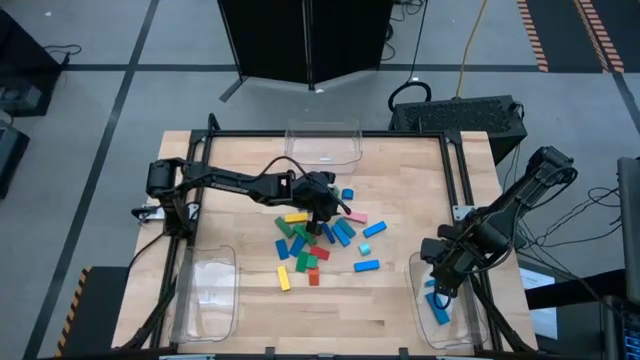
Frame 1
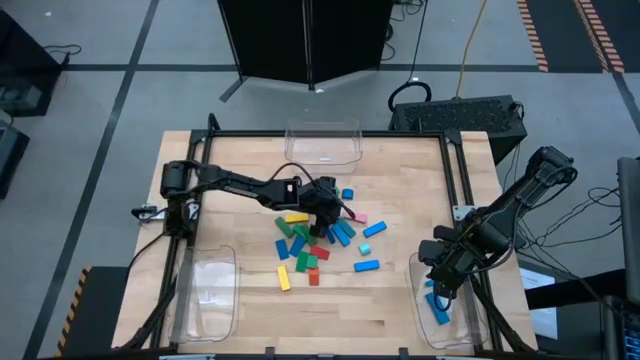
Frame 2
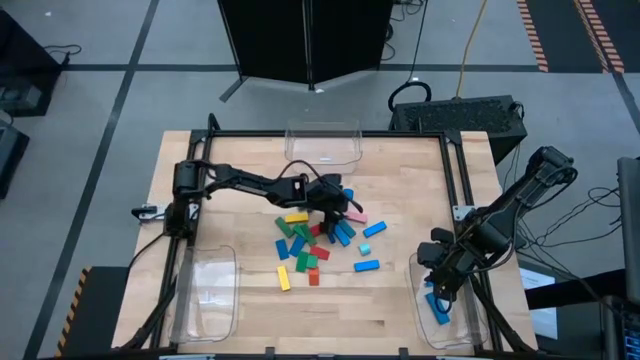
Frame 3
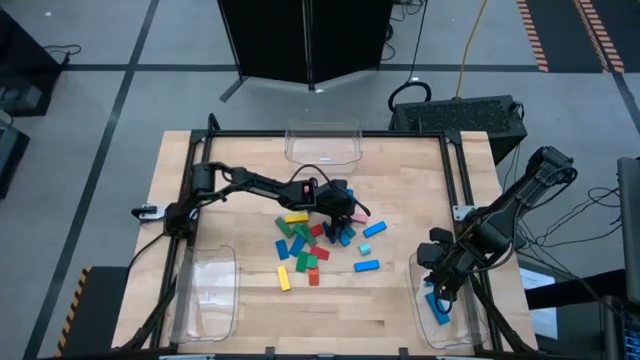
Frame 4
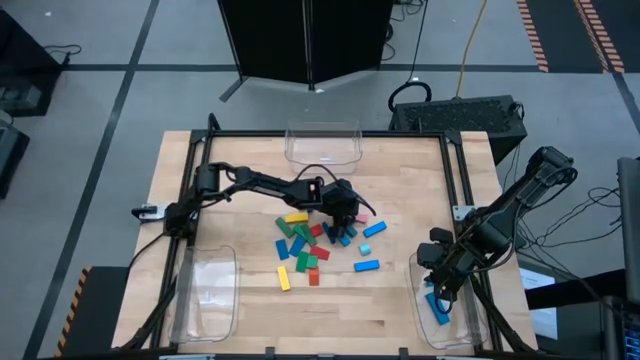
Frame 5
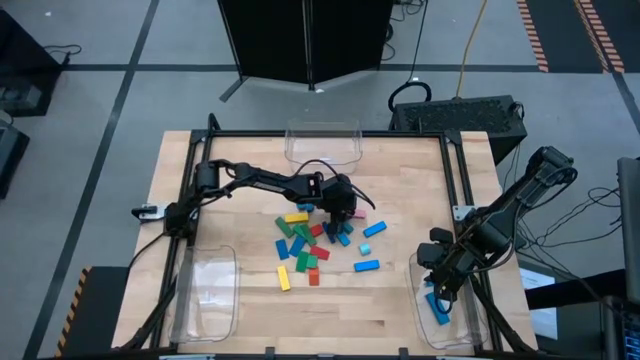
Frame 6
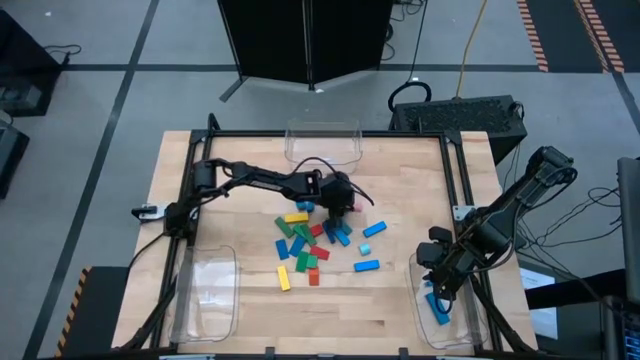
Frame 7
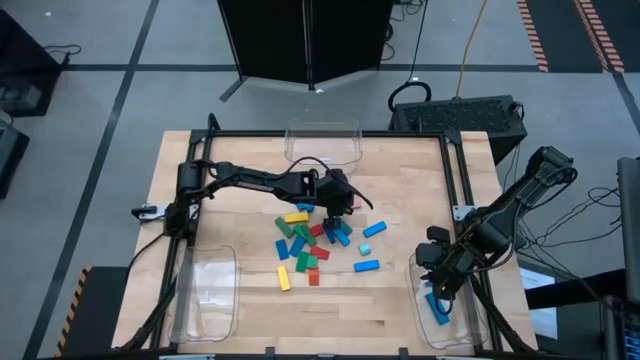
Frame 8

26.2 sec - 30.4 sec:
Task: Sort blocks by size
Put the pink rectangle block into the bottom right transparent bin

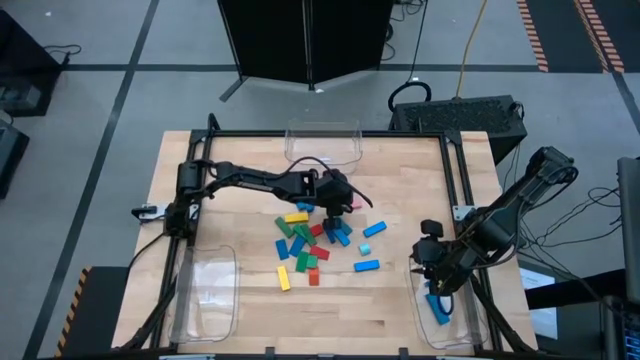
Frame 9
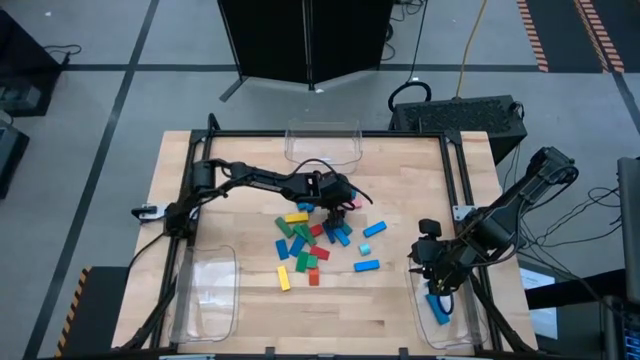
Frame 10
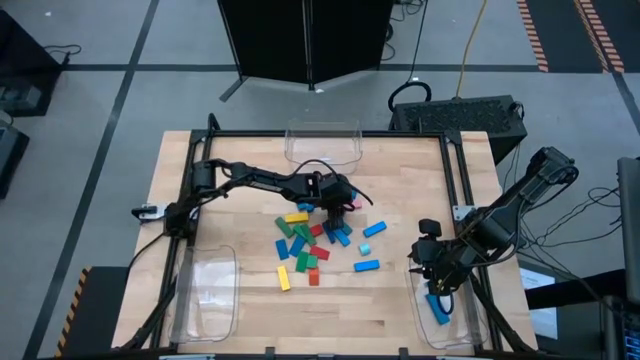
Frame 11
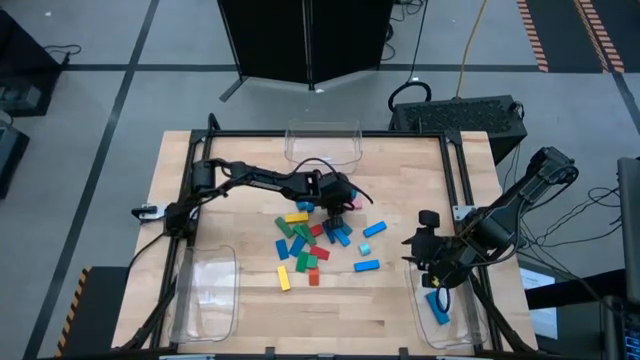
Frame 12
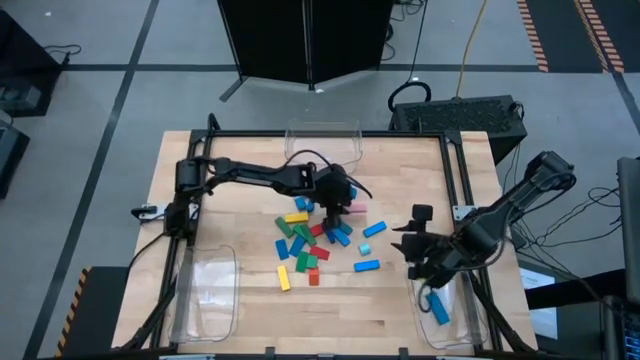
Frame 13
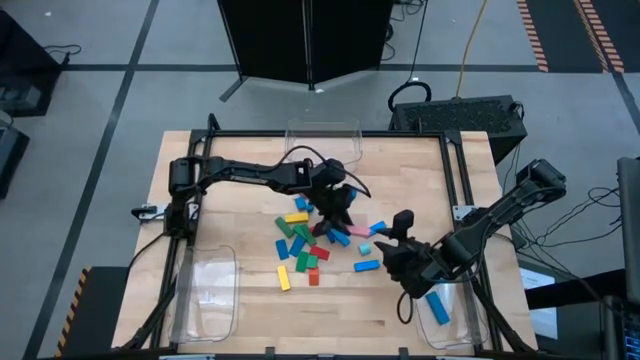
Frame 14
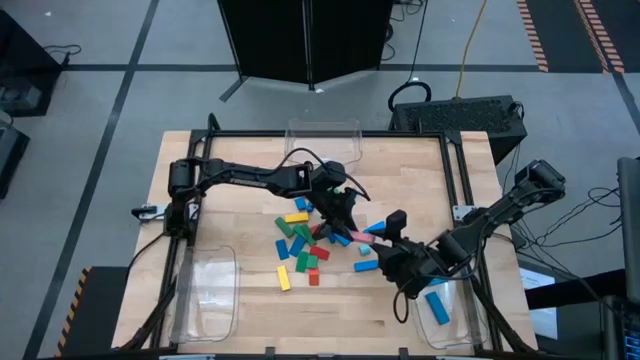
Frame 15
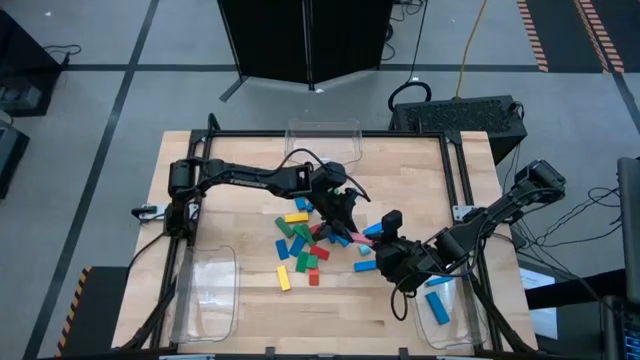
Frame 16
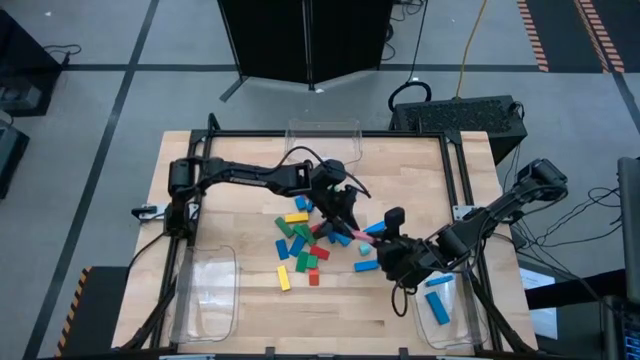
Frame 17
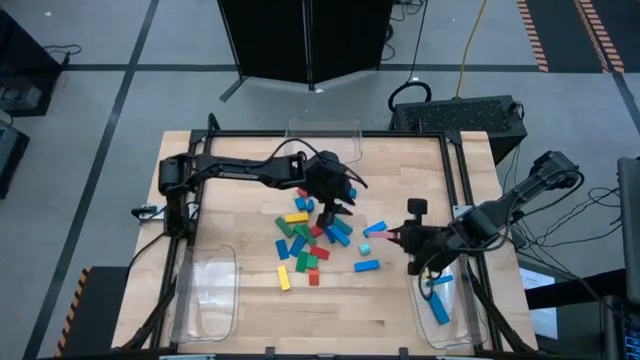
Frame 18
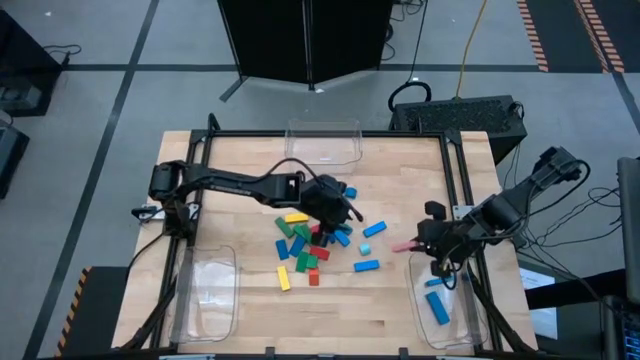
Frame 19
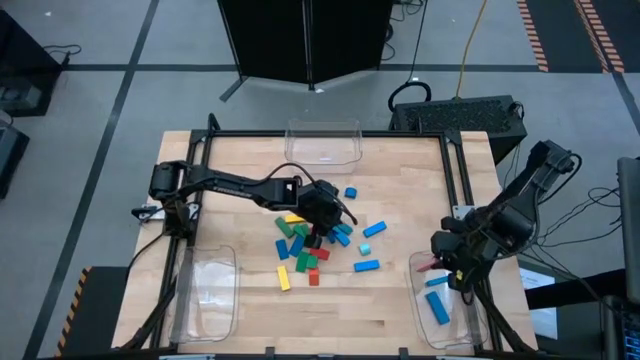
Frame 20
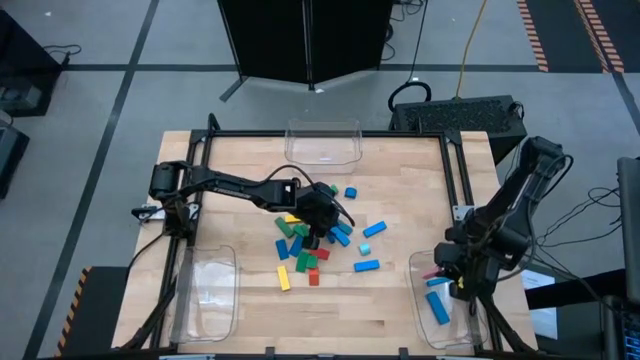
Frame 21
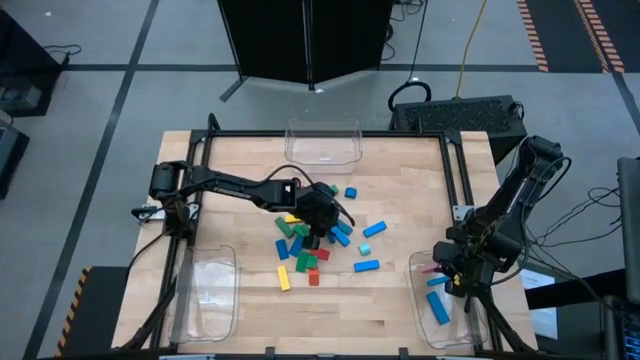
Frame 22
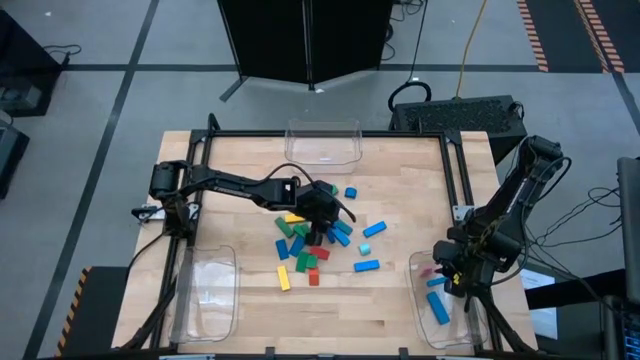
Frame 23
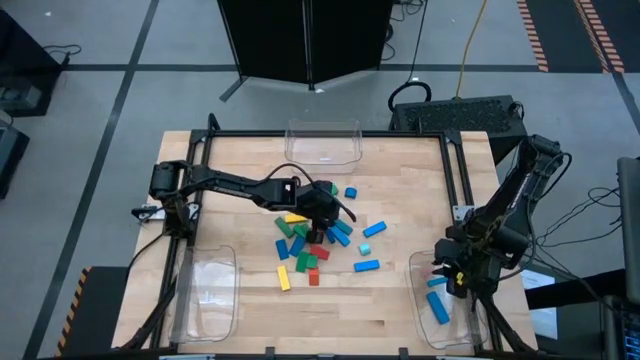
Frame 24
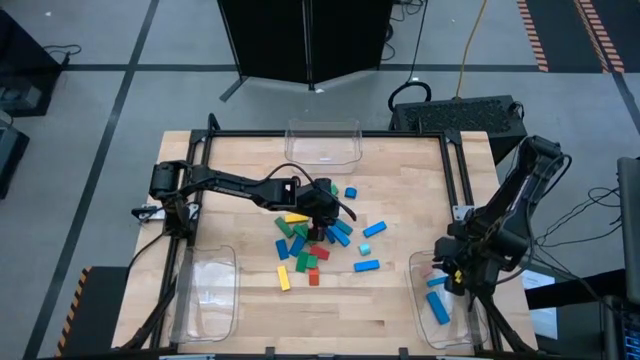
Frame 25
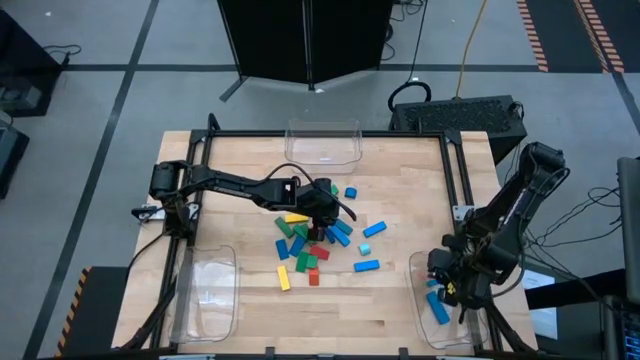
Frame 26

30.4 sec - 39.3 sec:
Put the pink rectangle block into the bottom right transparent bin

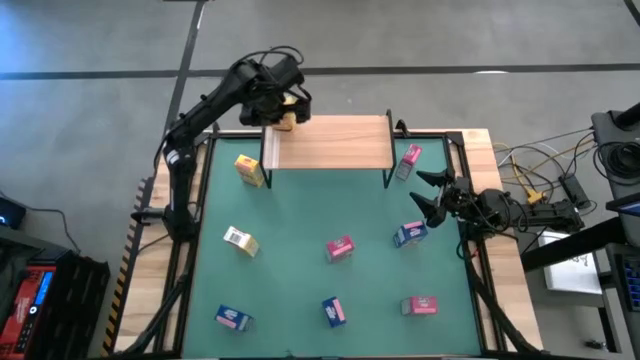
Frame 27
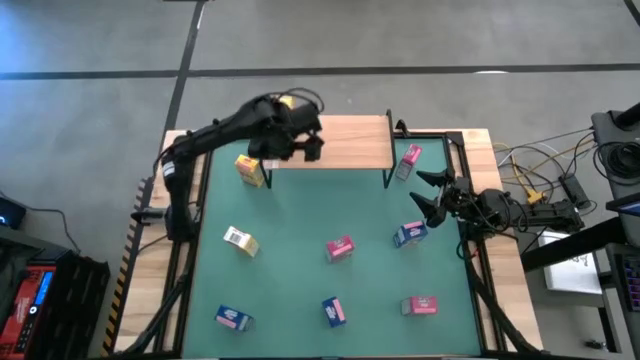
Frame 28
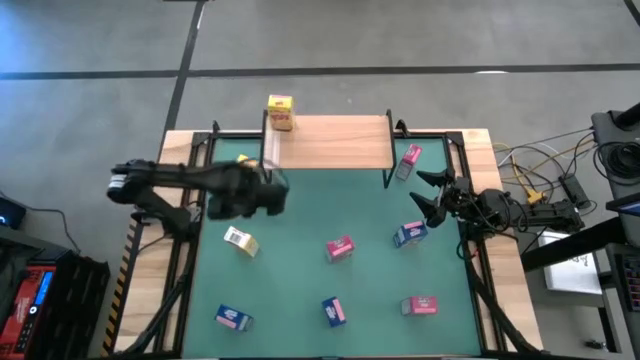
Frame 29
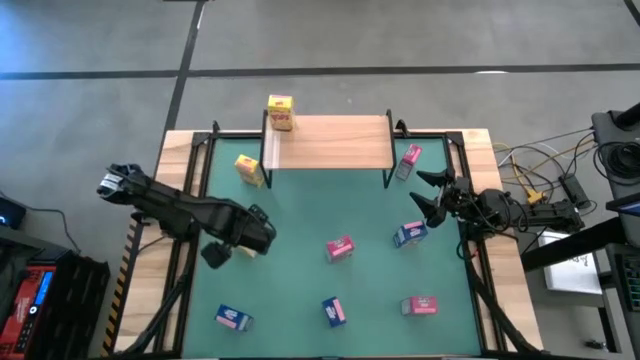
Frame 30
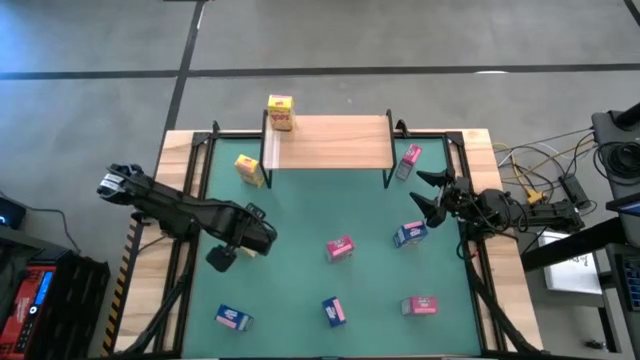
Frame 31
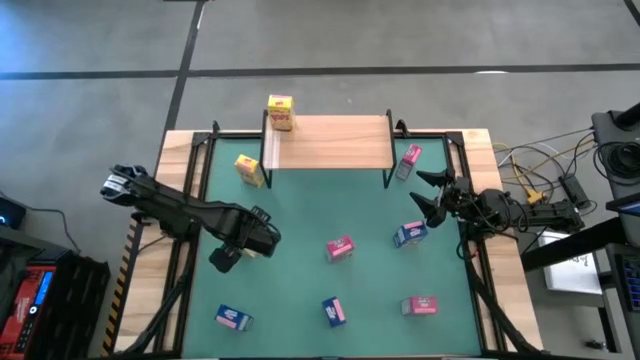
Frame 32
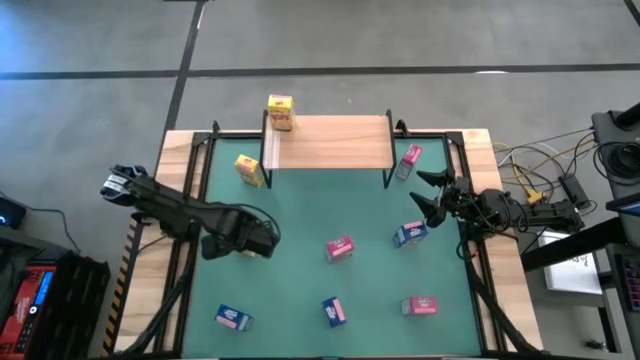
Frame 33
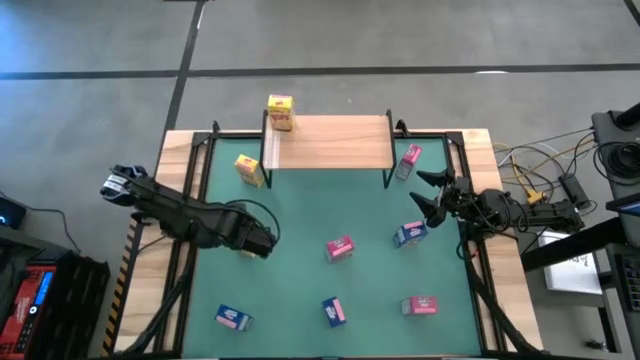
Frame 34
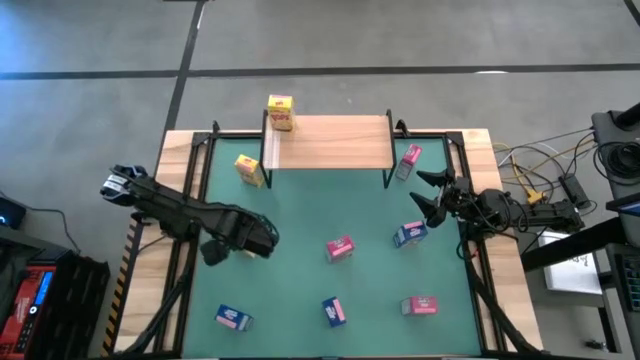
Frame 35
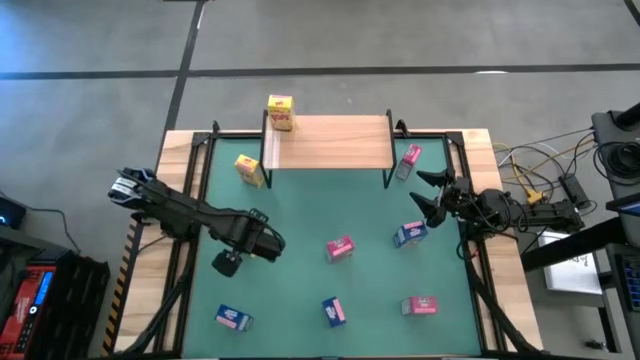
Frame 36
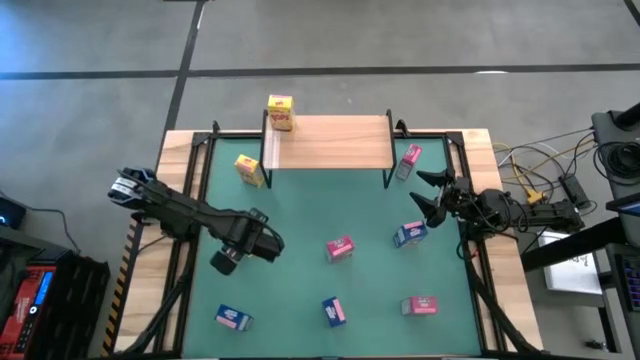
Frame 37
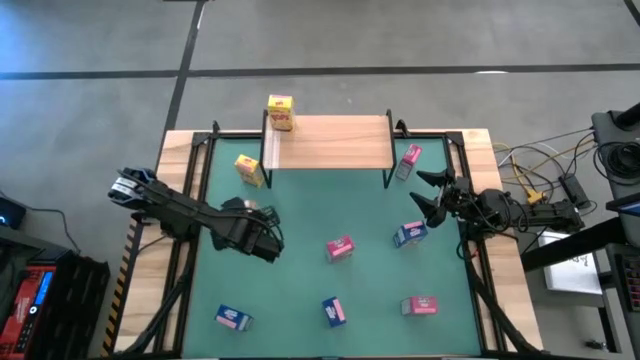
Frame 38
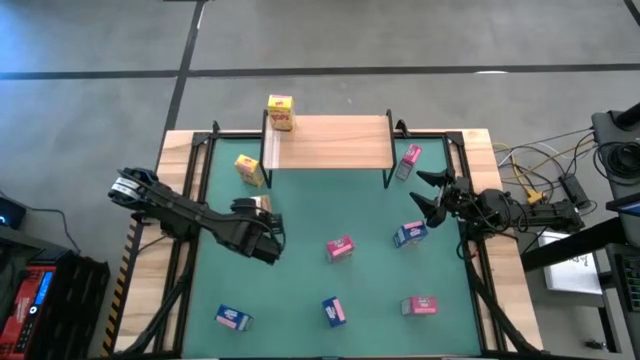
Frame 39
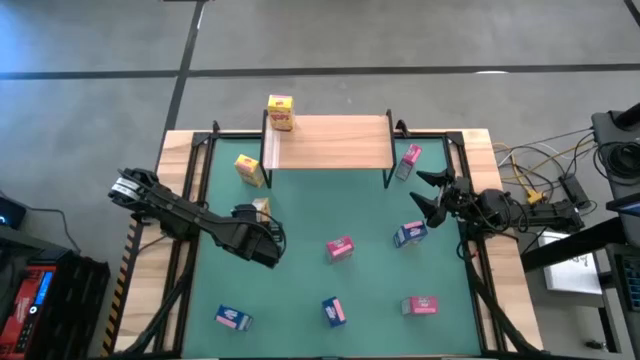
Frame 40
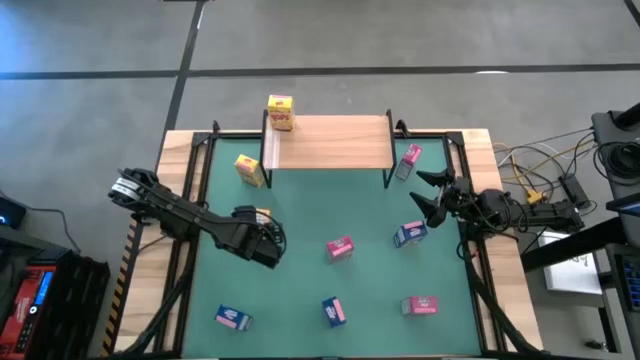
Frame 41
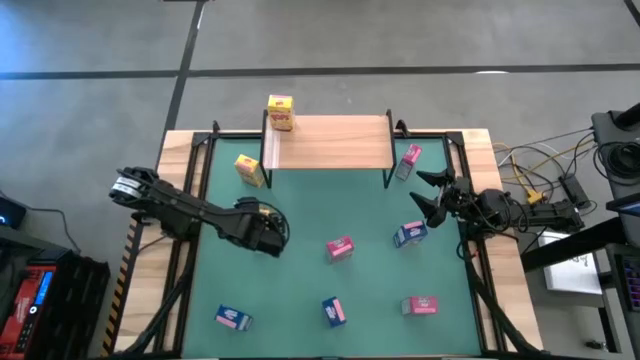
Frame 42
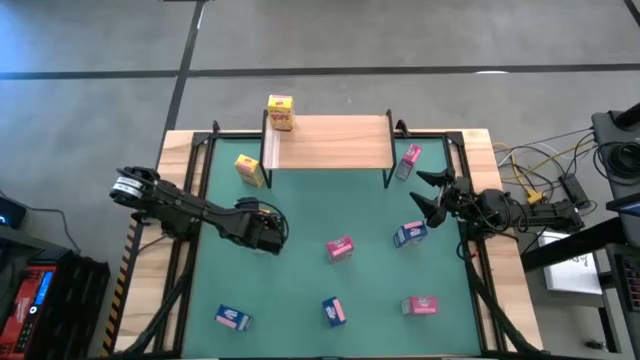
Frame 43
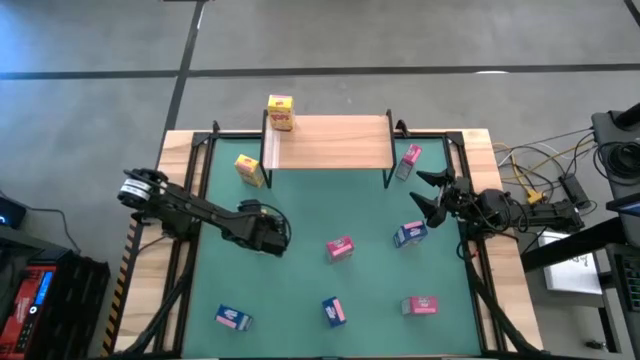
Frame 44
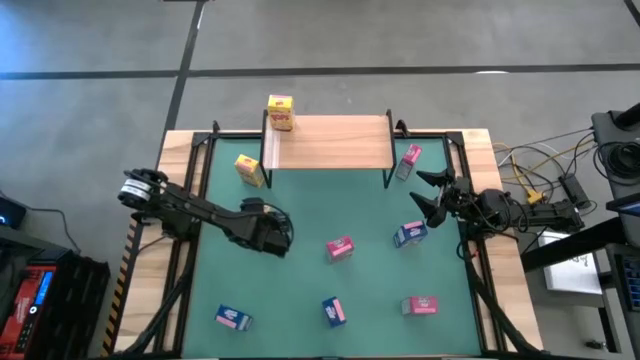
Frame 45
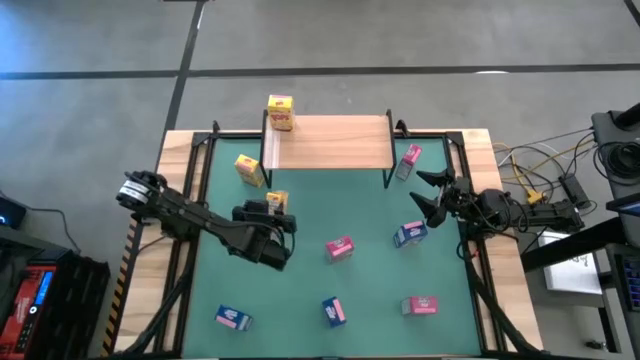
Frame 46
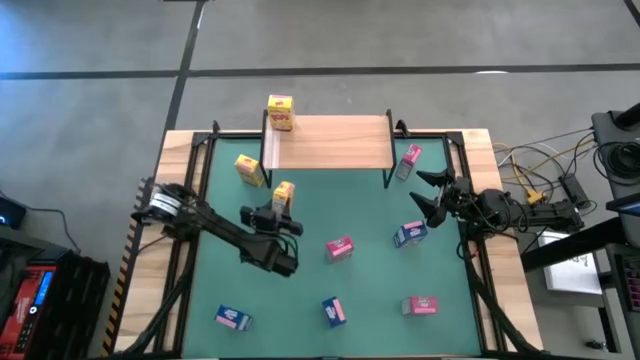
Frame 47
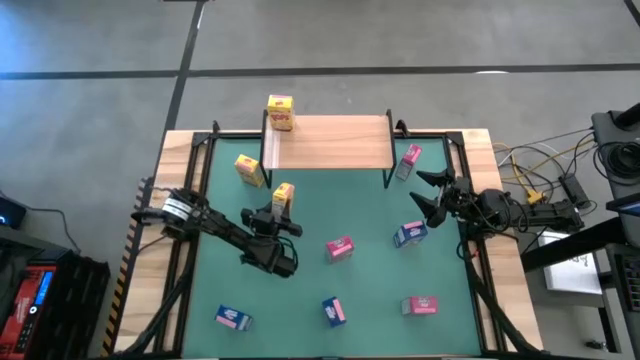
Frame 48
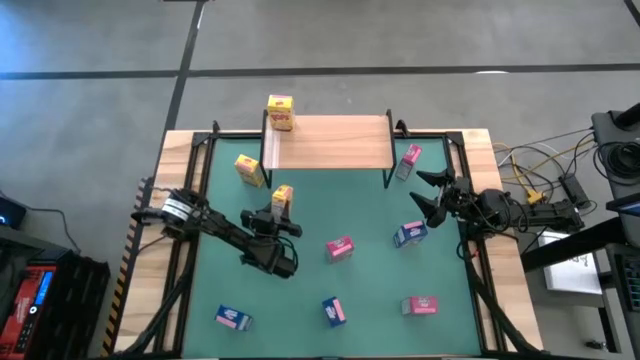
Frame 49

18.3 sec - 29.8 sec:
Task: Stack cereal on shelf
Put the bottom yellow cereal box on the shelf
